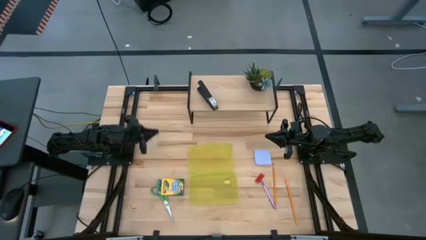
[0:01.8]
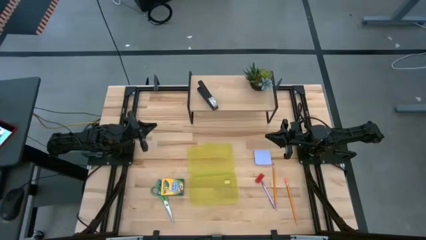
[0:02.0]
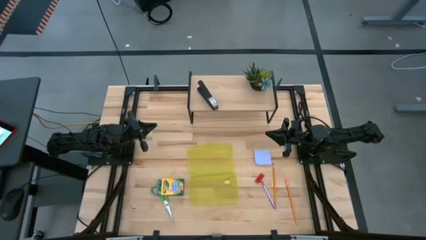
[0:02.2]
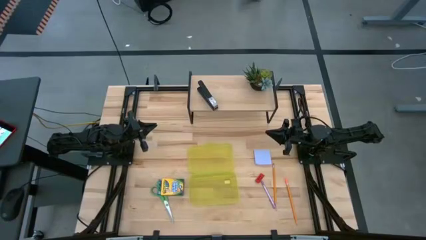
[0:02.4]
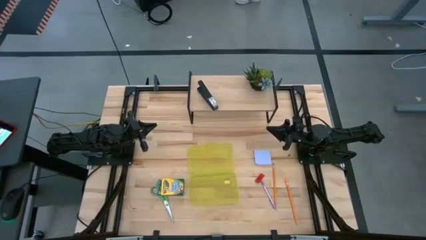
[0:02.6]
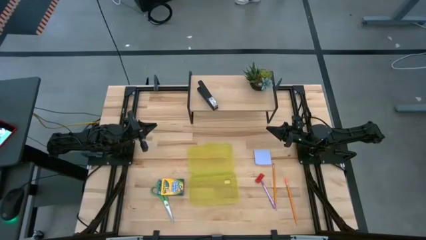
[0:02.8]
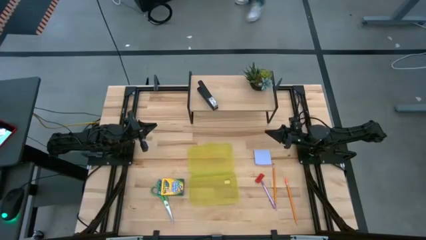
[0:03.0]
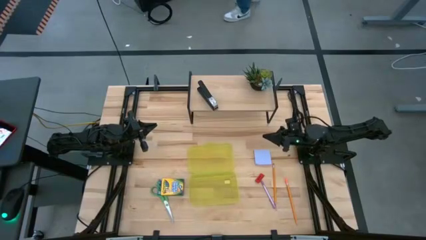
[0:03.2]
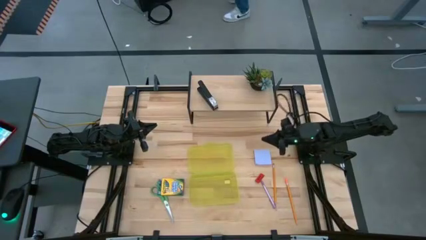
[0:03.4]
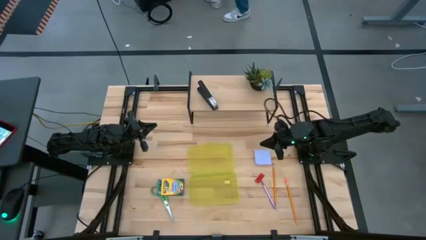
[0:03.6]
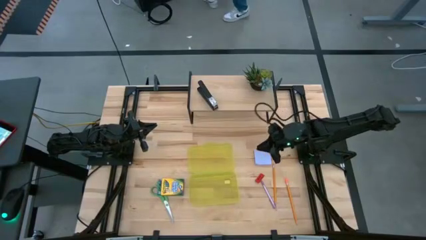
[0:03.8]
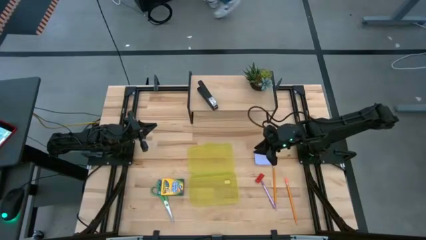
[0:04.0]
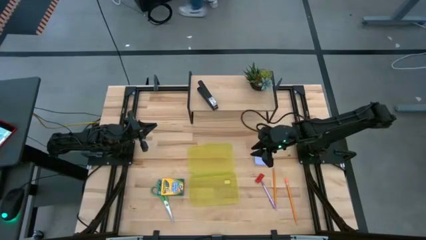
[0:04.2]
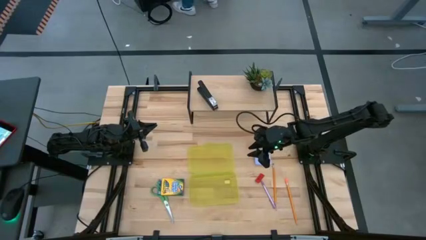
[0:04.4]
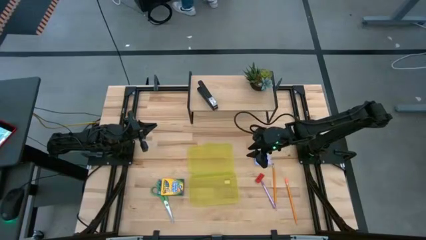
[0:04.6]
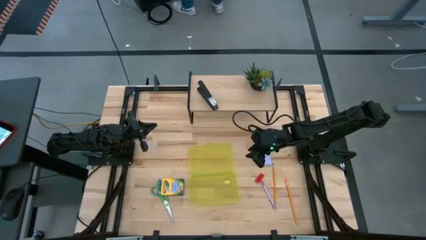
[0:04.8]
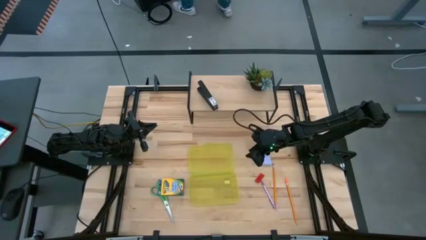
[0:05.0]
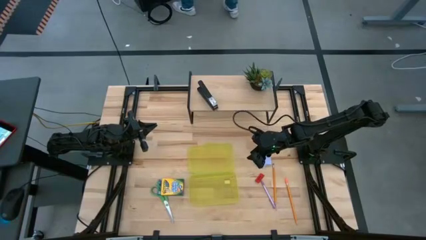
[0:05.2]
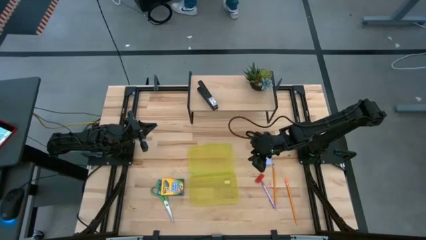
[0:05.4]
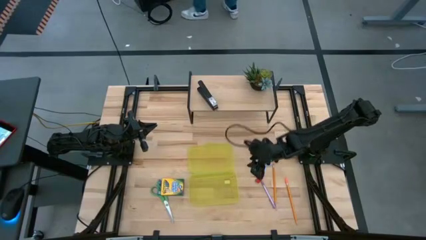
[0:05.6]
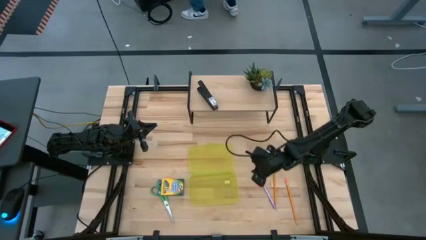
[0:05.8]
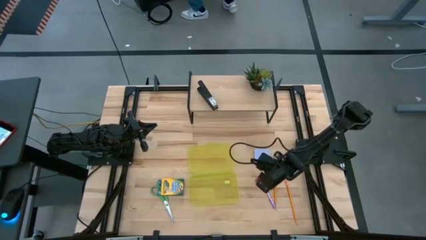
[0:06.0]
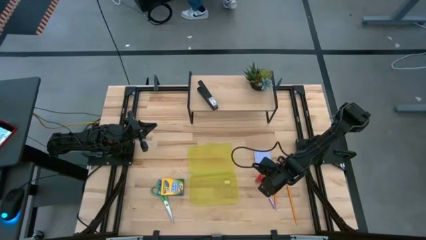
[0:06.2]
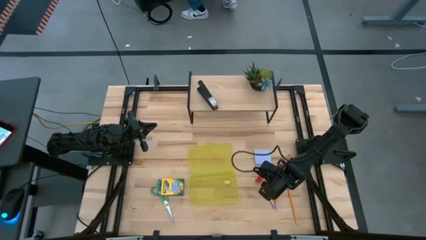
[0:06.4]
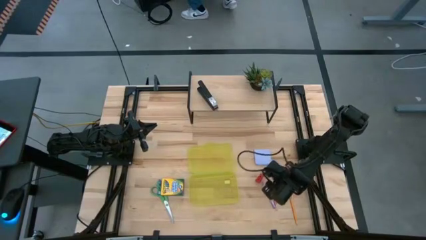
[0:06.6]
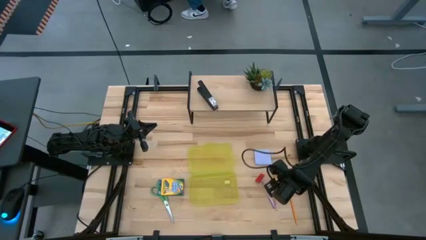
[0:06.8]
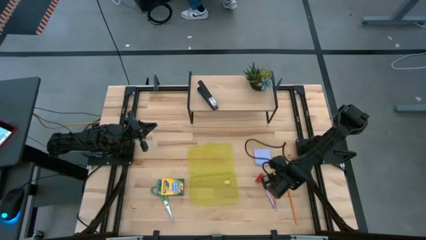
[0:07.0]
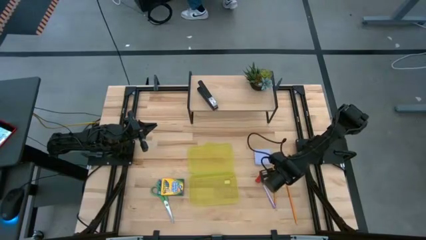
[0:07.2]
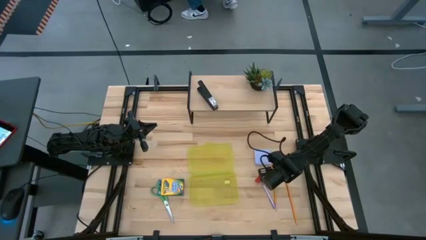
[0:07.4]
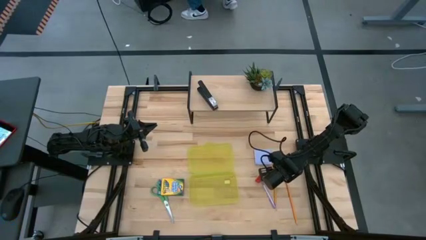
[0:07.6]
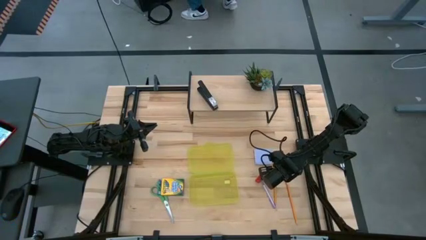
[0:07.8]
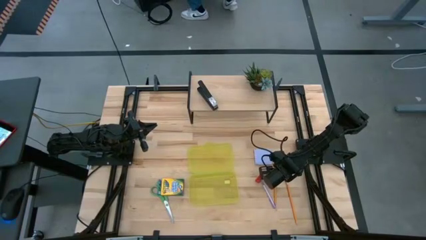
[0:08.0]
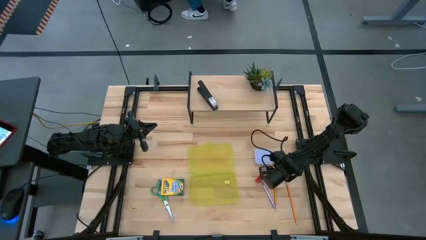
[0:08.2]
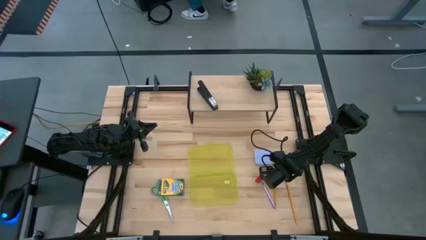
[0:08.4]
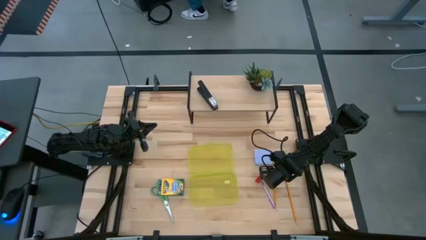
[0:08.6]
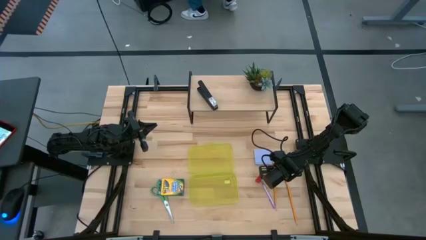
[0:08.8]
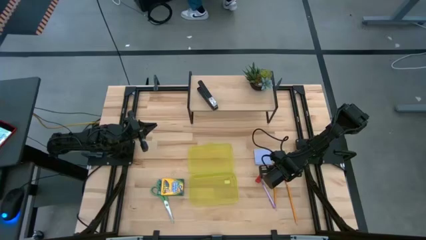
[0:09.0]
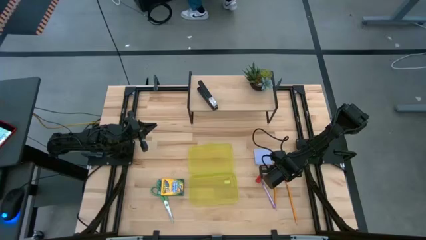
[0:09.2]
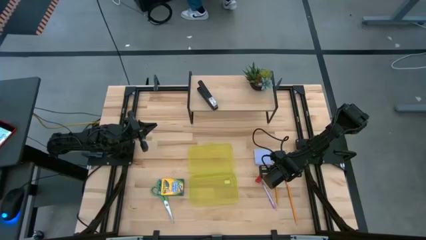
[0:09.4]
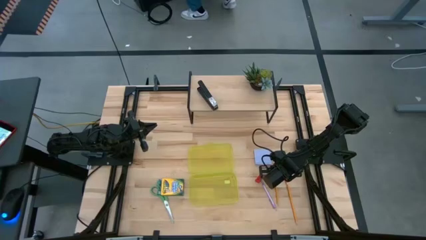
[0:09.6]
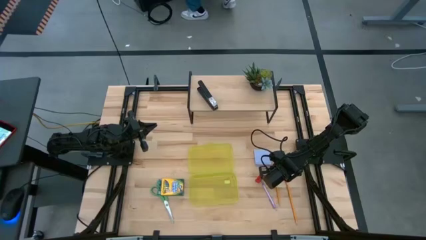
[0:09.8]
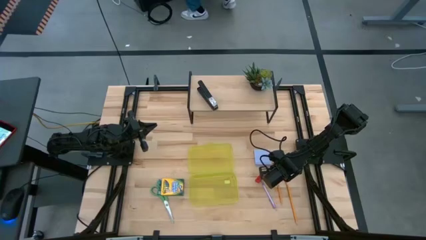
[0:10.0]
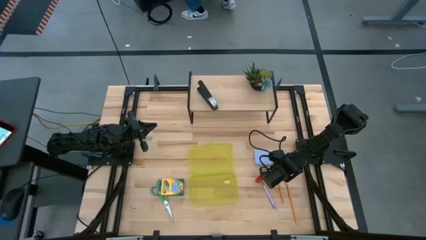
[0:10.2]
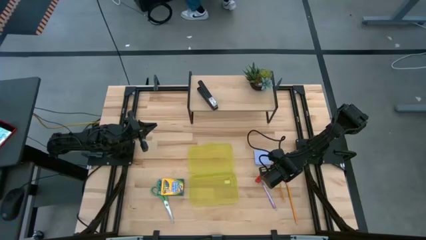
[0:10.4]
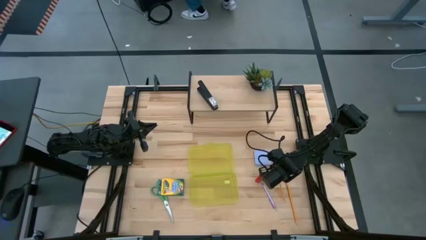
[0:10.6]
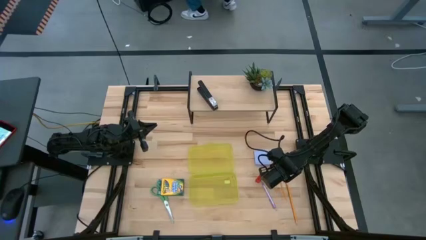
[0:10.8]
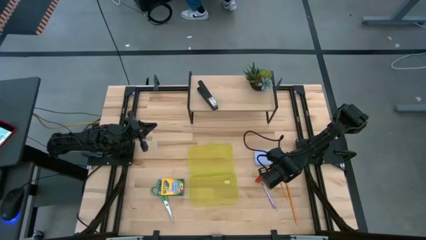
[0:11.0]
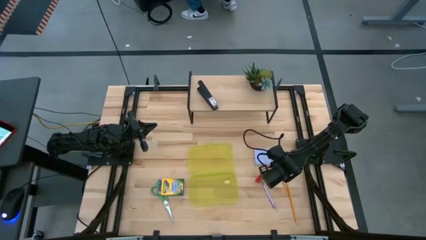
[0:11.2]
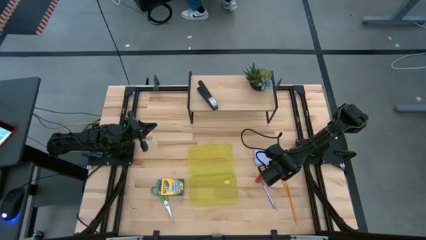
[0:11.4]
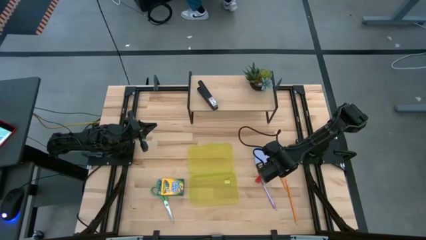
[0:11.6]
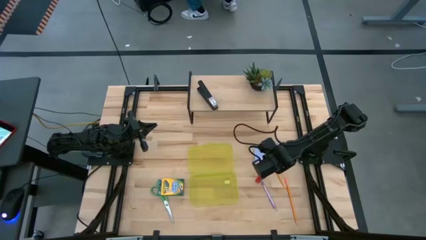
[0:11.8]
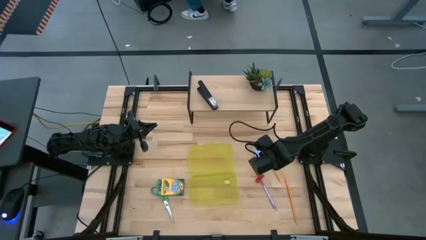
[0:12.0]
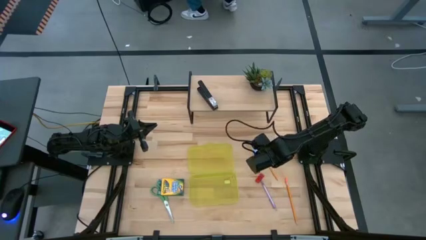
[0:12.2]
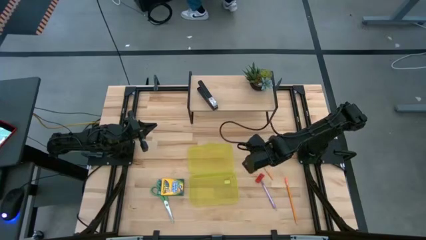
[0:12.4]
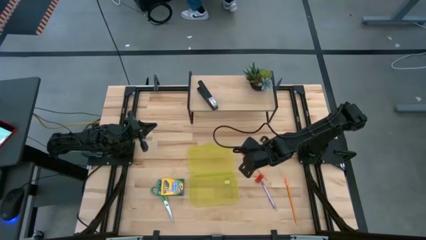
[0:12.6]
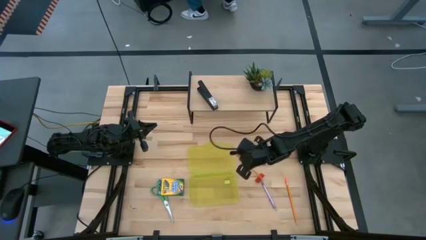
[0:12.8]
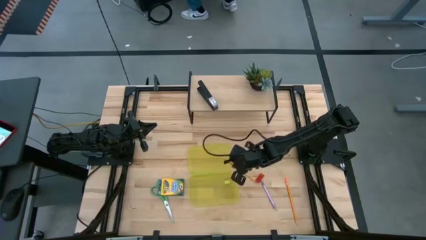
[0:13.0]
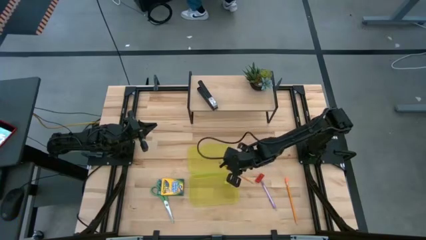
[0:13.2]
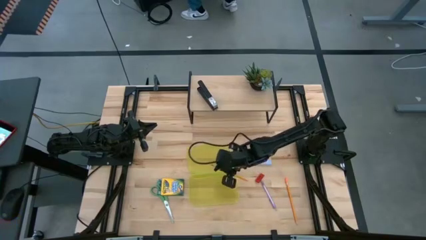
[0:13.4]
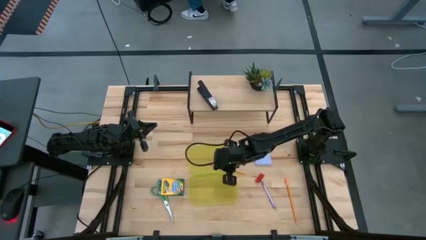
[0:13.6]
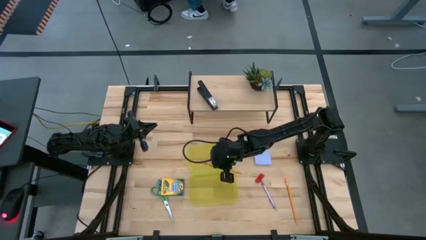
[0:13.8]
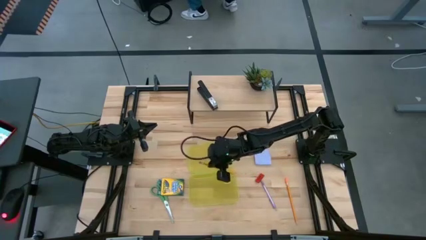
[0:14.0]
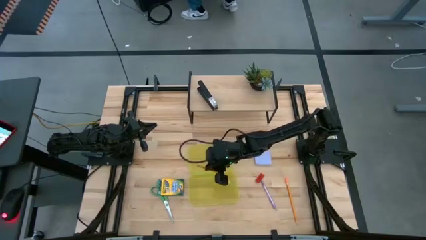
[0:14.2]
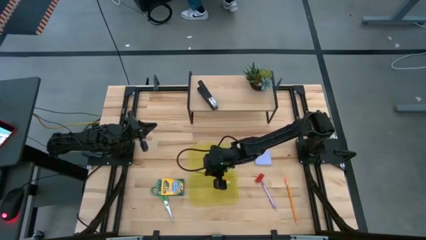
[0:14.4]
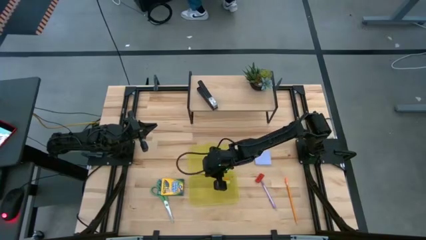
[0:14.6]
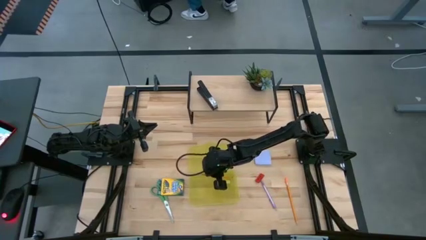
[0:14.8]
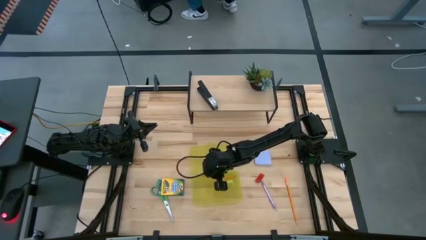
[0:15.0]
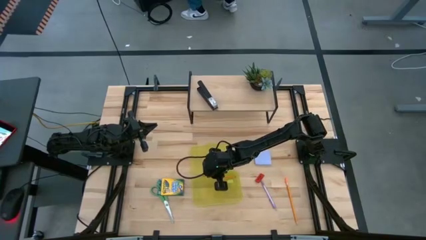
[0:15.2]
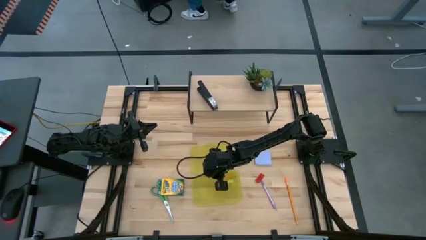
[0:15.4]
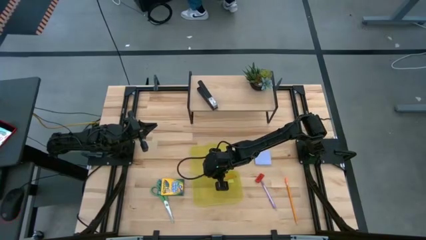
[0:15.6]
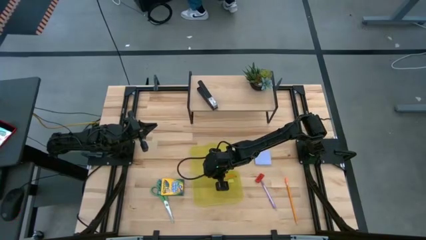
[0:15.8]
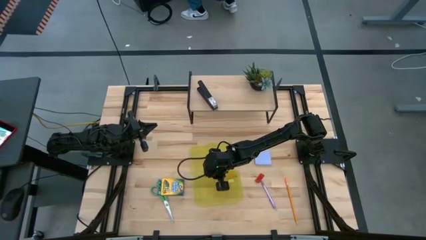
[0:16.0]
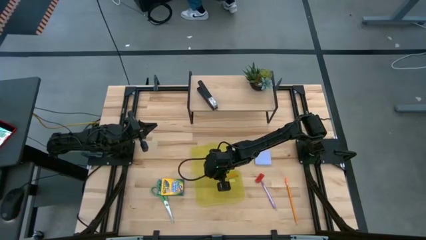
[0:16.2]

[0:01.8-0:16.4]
Task: Pack school essentials
Put the left yellow pencil into the yellow supply box
